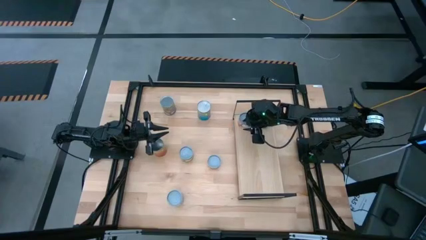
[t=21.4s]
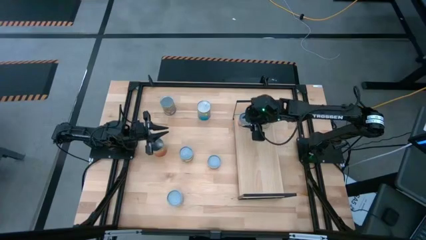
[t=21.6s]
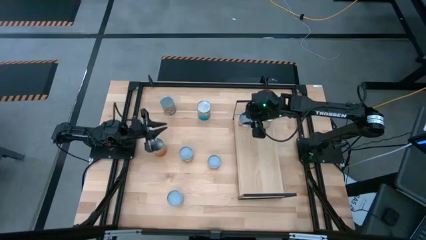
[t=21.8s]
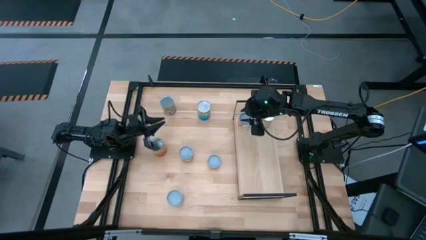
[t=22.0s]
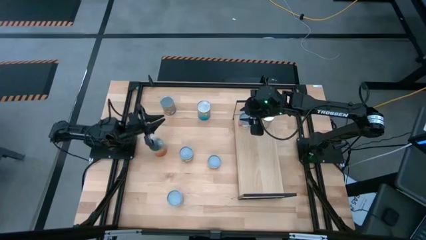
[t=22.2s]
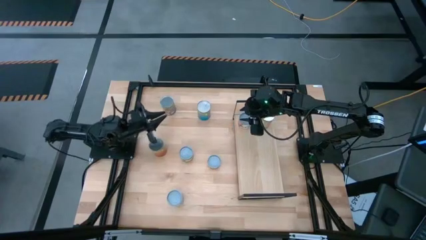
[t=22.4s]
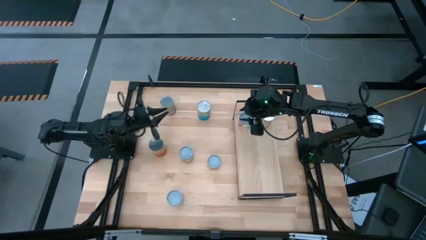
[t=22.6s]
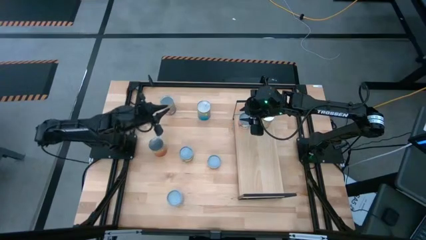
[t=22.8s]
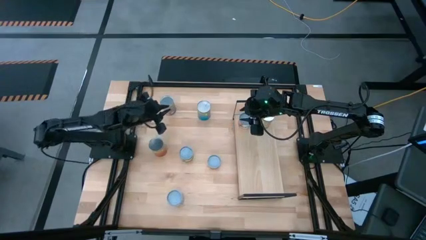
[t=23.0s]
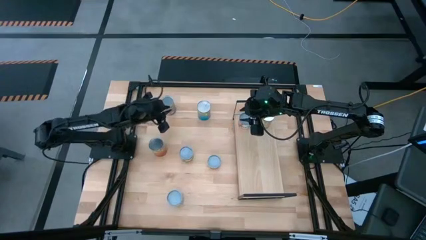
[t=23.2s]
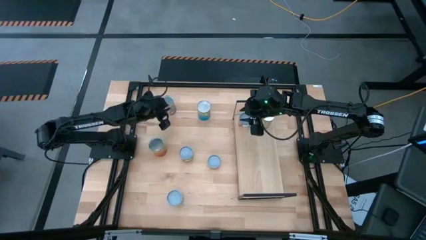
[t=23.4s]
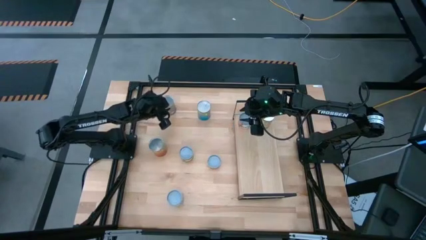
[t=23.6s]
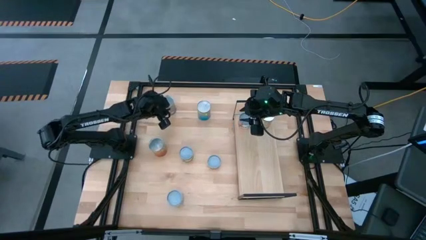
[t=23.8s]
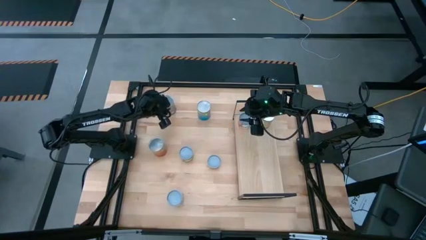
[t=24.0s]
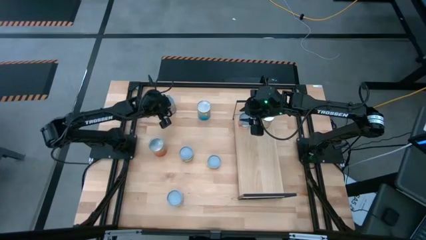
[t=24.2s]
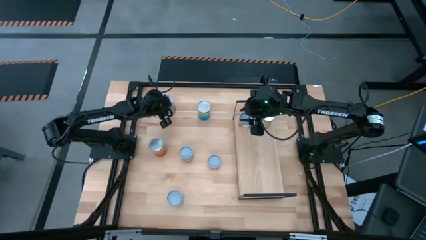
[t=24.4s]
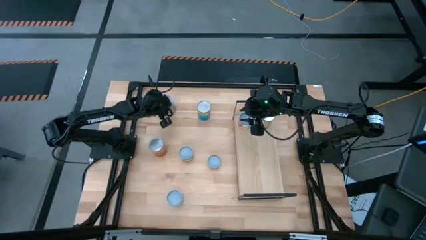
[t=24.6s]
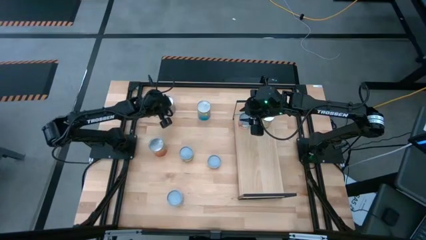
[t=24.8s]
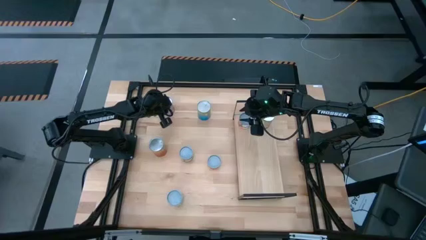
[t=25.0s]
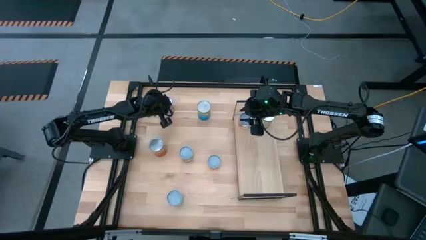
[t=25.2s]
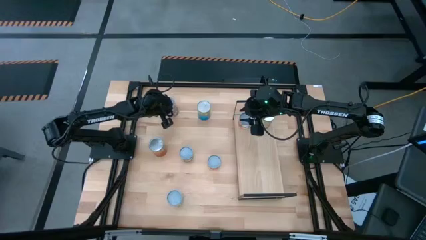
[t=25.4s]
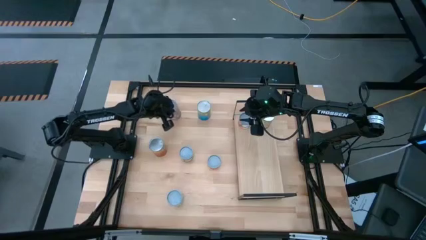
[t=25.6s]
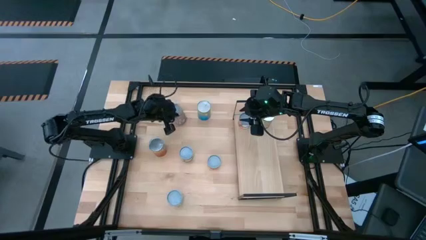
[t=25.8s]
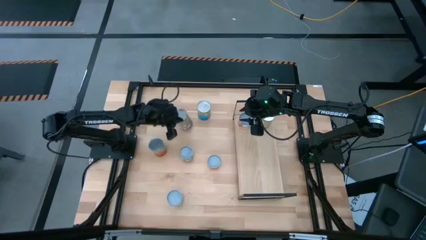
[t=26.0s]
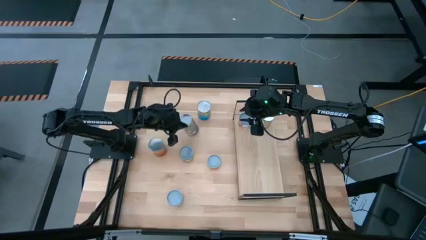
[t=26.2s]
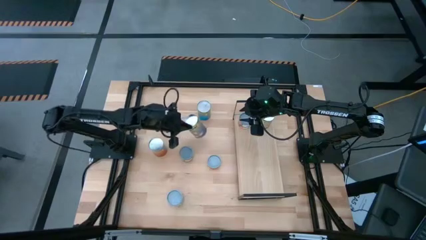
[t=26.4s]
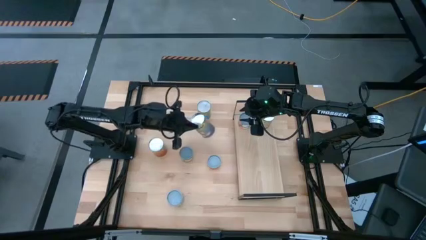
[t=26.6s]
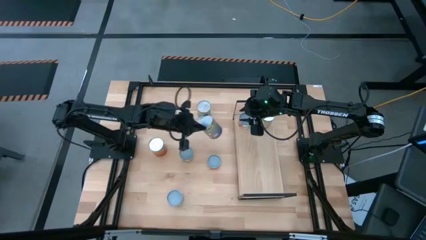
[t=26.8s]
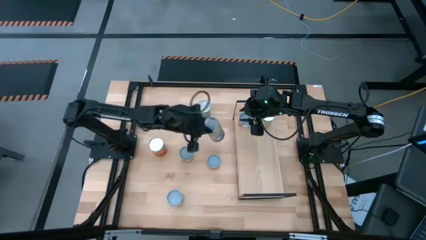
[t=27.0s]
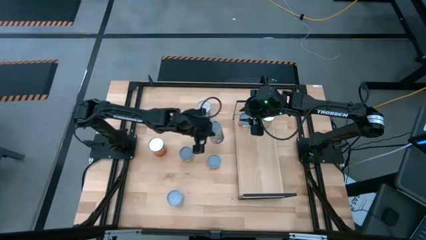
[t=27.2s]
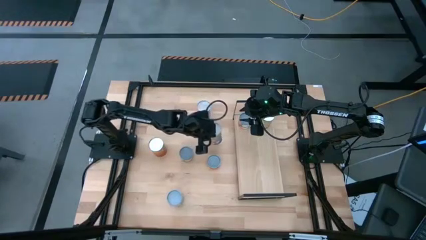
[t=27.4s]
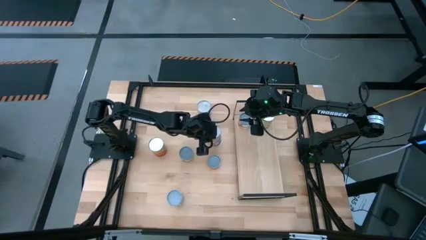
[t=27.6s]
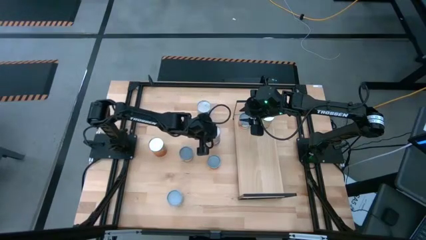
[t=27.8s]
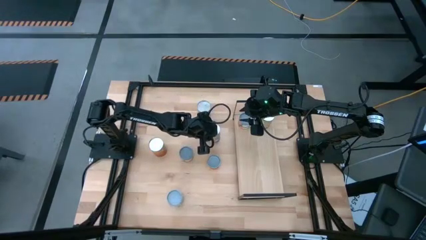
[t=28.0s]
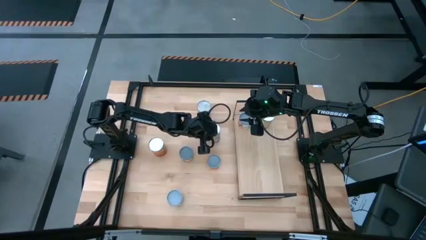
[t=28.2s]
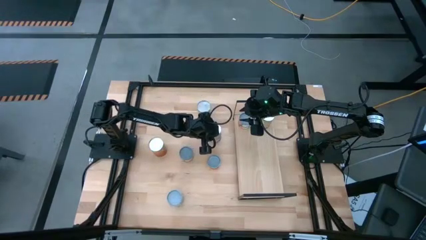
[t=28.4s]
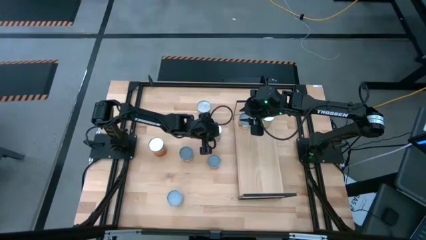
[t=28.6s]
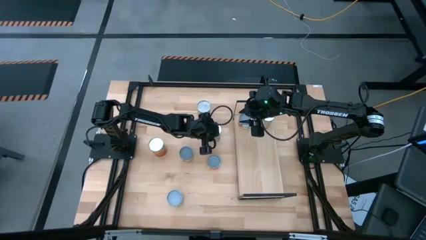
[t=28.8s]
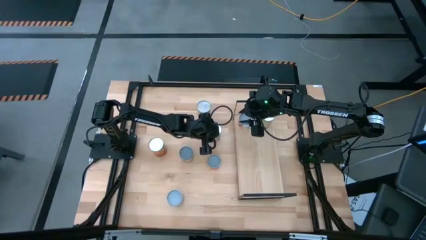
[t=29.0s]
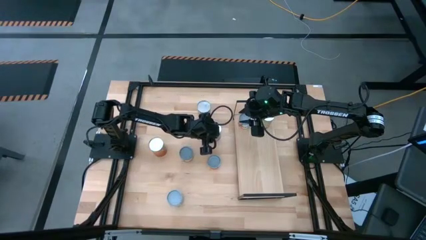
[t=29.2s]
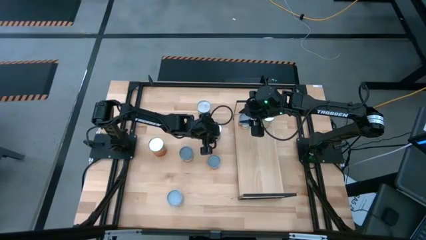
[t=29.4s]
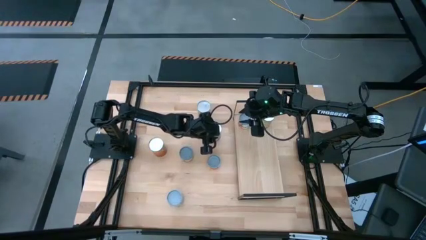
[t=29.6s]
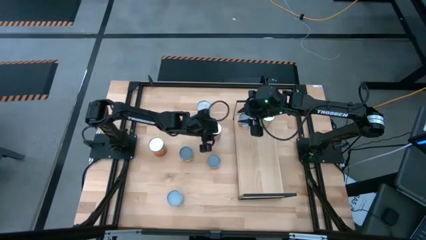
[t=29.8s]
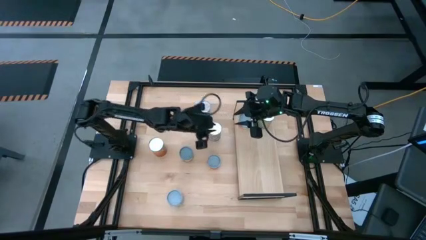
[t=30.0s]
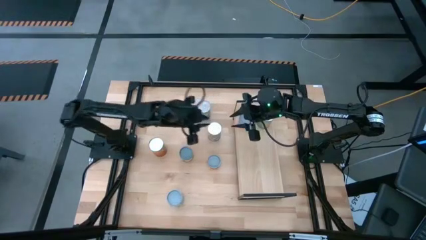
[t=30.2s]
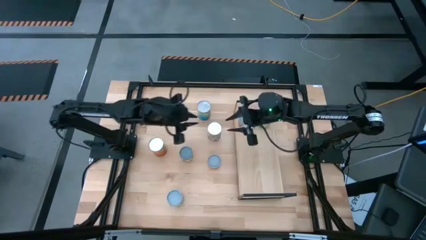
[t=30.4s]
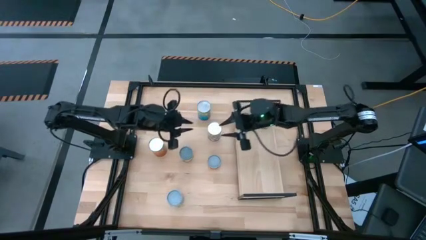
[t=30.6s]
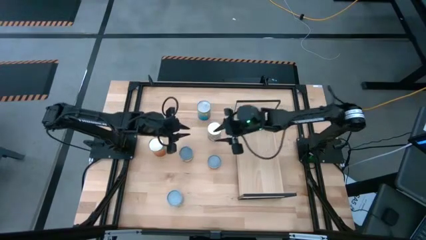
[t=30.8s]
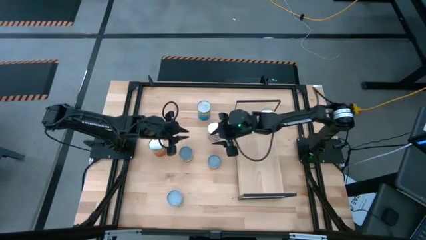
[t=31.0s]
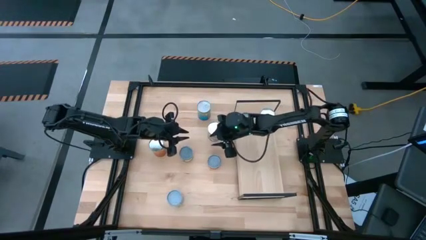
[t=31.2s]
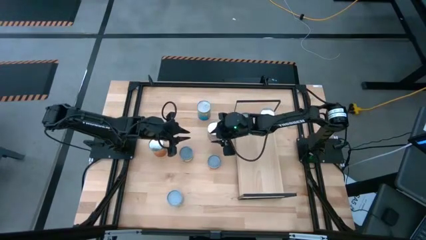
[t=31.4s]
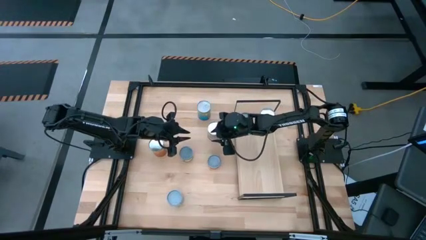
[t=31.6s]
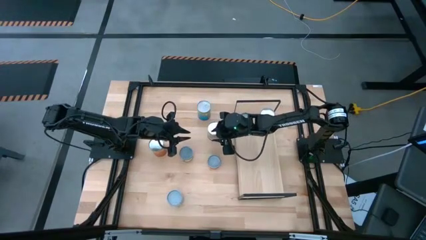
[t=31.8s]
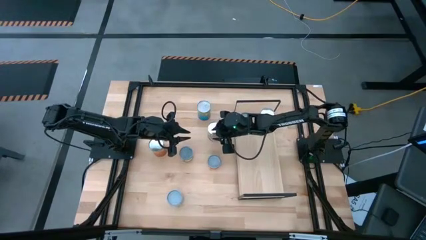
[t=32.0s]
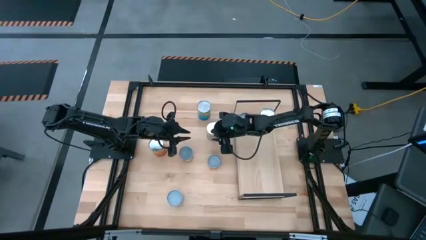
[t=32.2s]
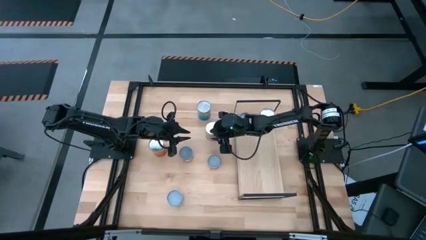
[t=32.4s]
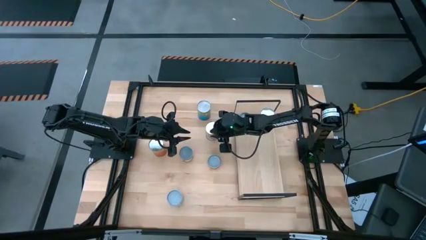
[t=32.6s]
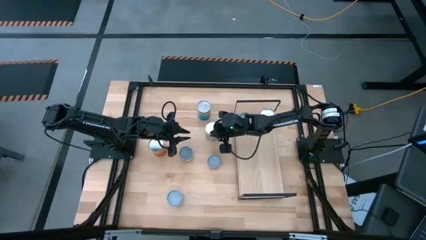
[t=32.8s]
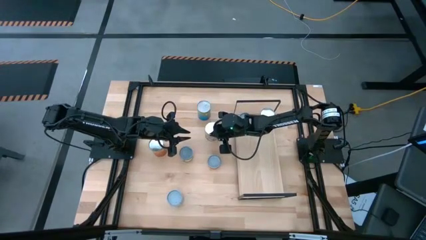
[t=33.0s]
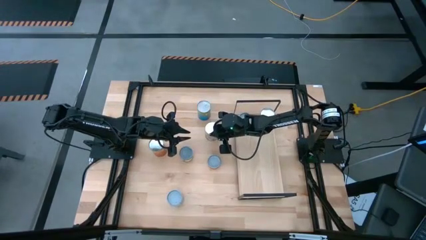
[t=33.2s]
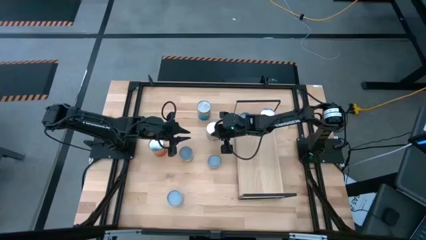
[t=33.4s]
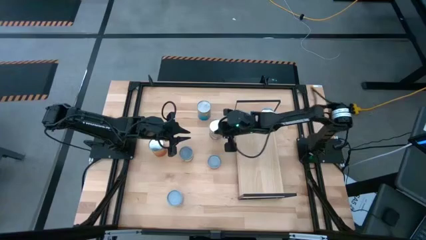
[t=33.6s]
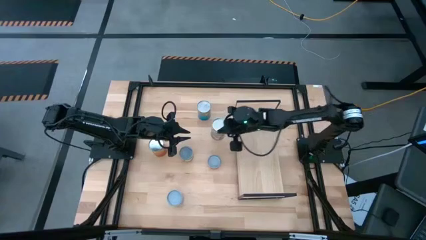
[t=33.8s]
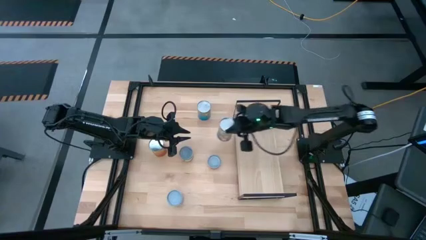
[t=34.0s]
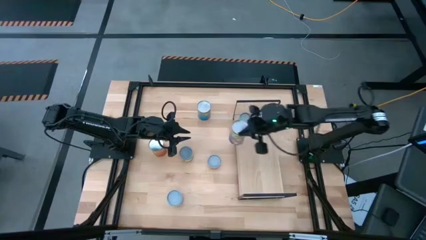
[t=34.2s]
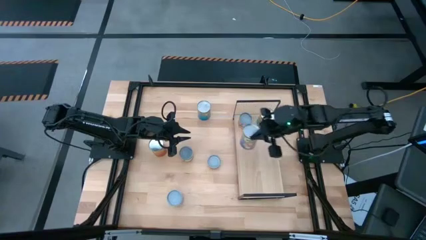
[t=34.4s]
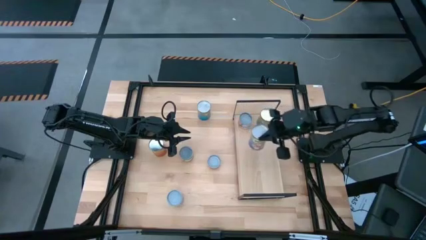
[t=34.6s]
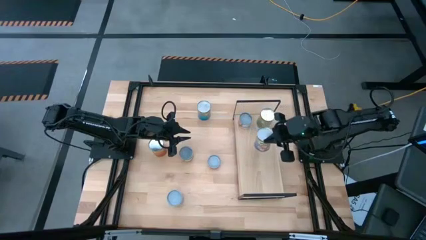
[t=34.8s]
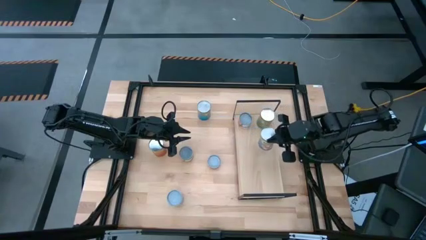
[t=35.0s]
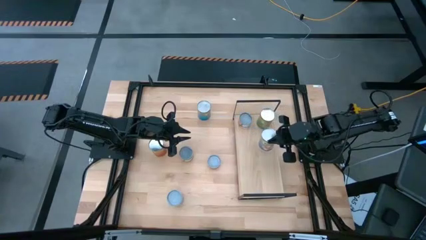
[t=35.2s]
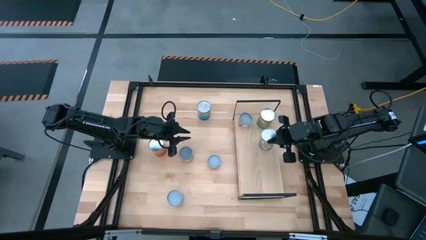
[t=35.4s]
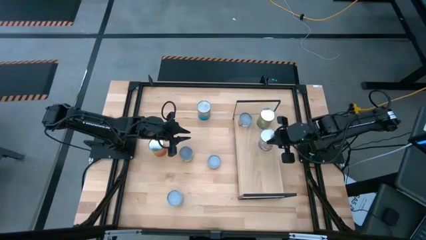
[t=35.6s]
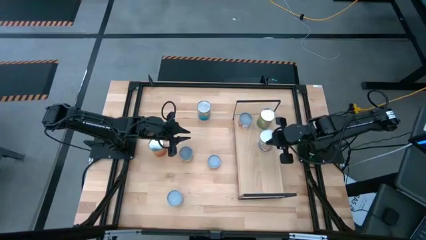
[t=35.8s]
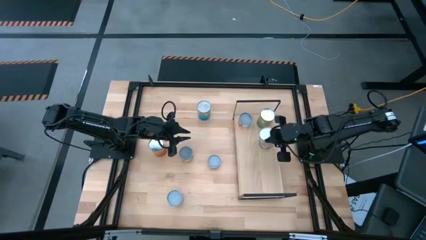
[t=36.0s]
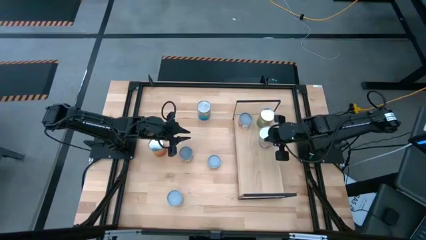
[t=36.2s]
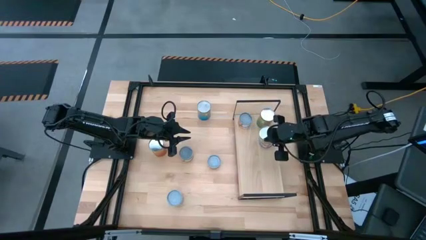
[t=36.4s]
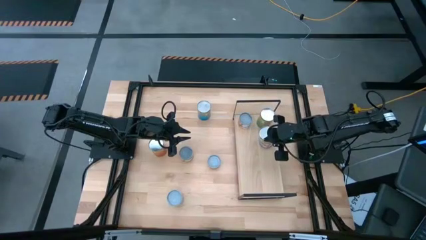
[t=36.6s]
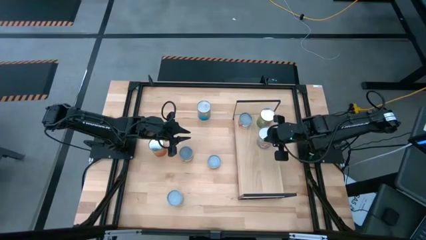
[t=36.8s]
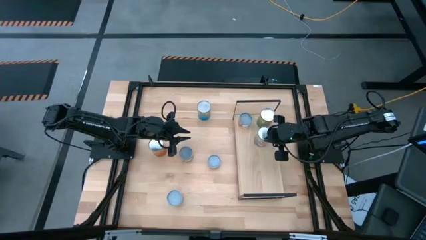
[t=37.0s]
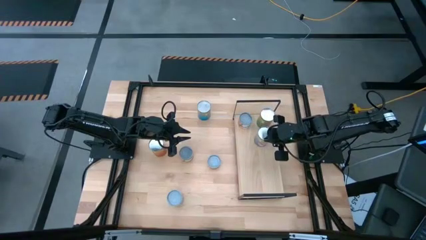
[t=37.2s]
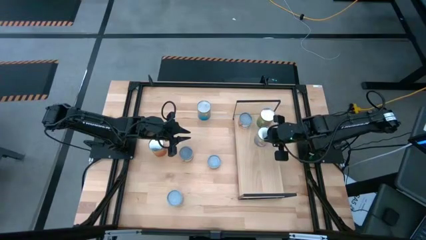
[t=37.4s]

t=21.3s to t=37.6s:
Task: Pick and place cans onto a shelf
Put the canned peaches on the shelf
